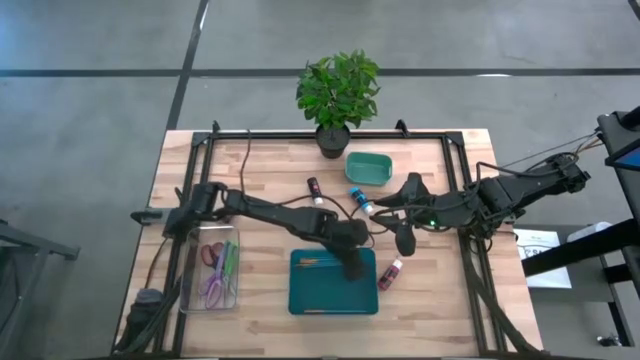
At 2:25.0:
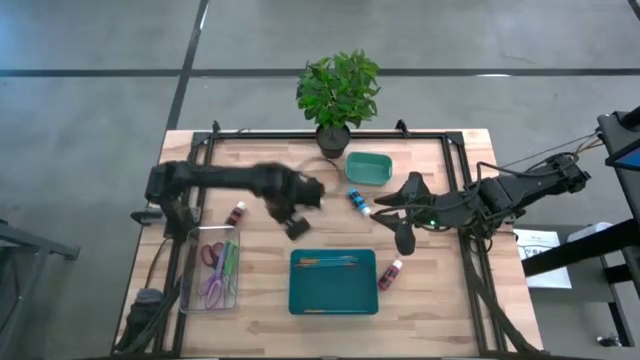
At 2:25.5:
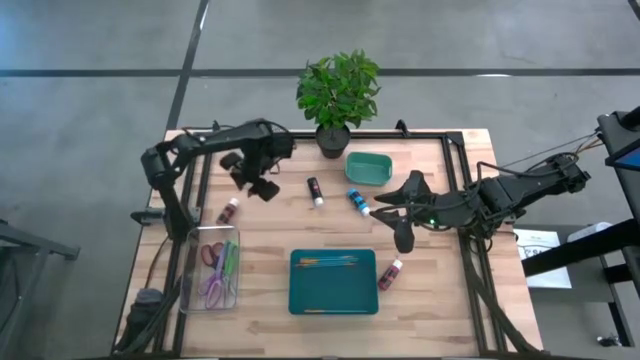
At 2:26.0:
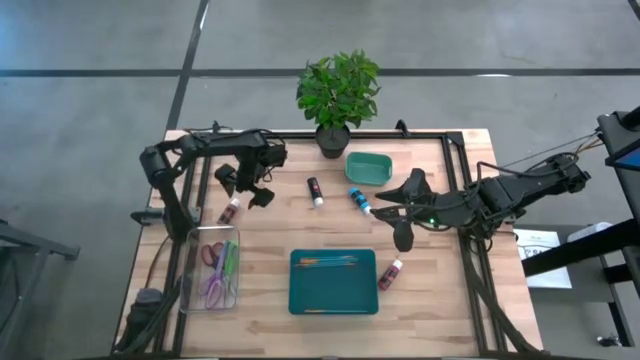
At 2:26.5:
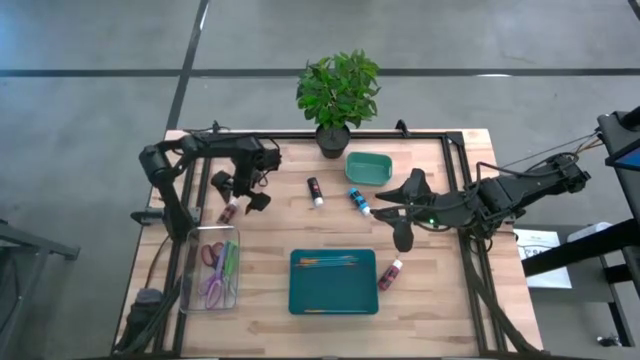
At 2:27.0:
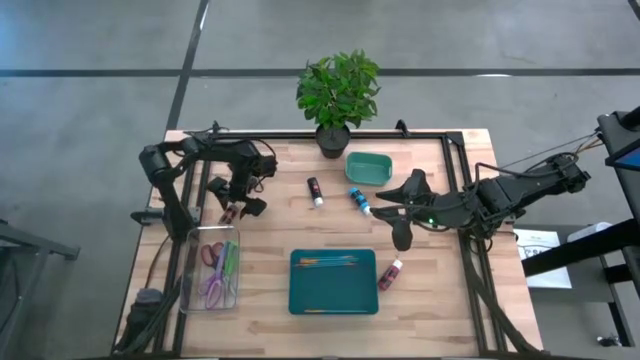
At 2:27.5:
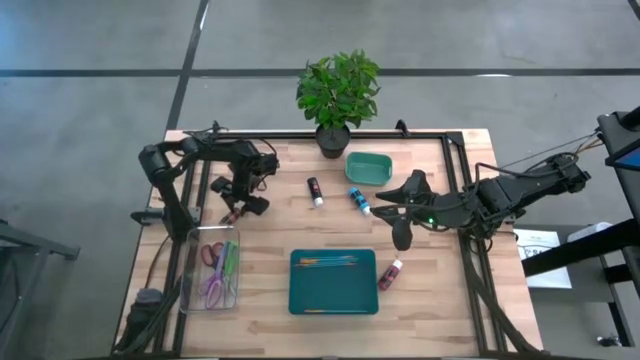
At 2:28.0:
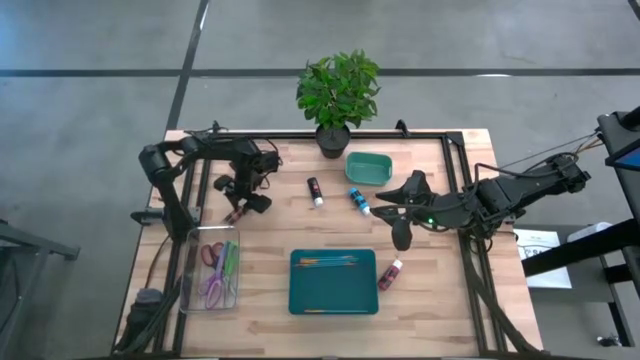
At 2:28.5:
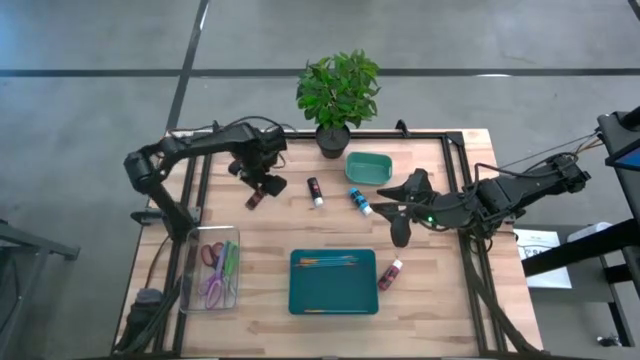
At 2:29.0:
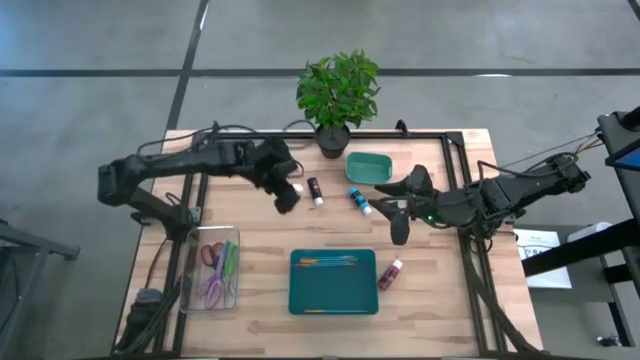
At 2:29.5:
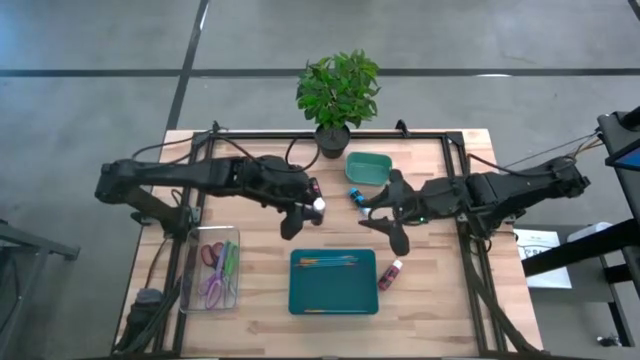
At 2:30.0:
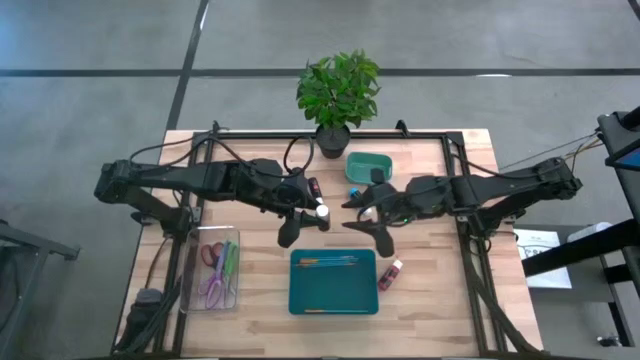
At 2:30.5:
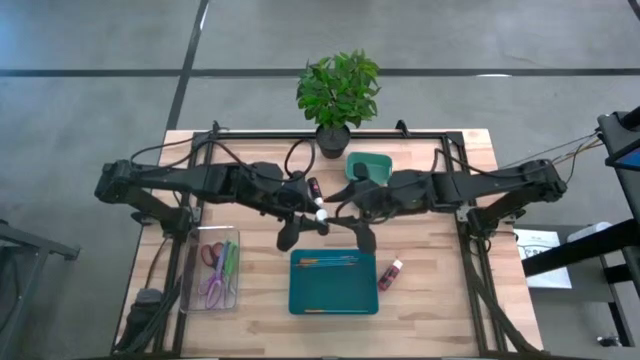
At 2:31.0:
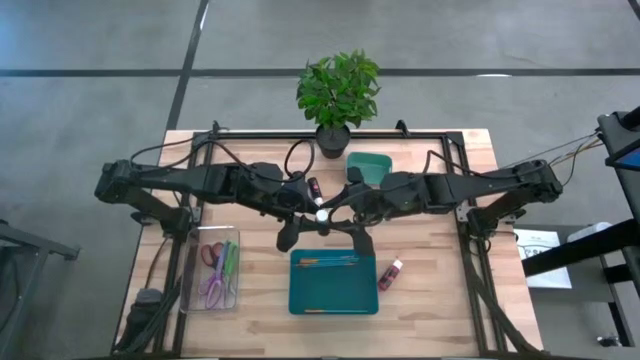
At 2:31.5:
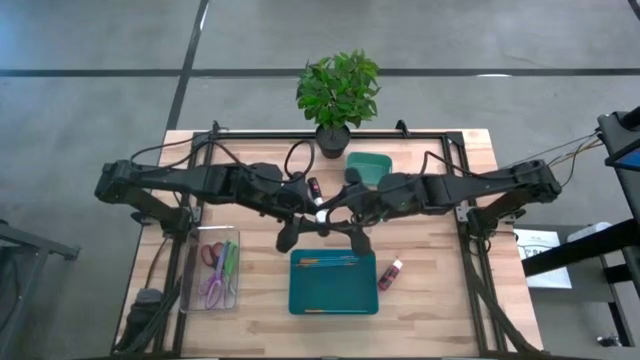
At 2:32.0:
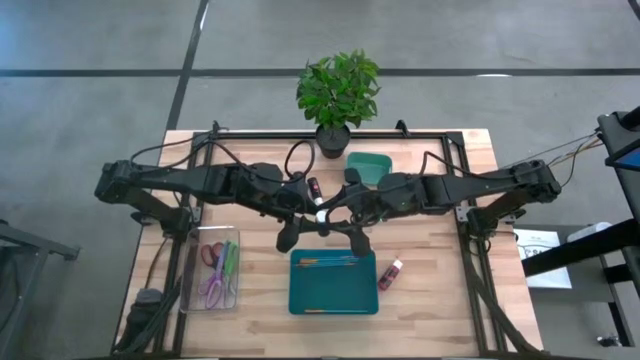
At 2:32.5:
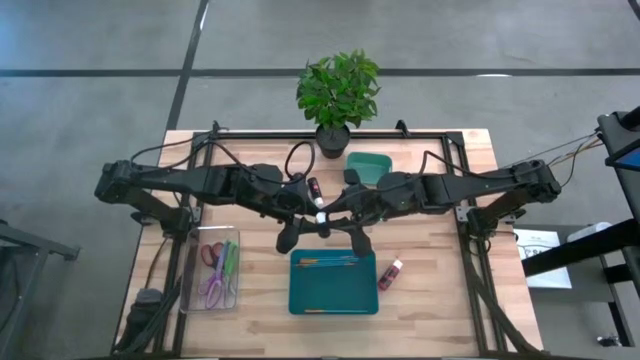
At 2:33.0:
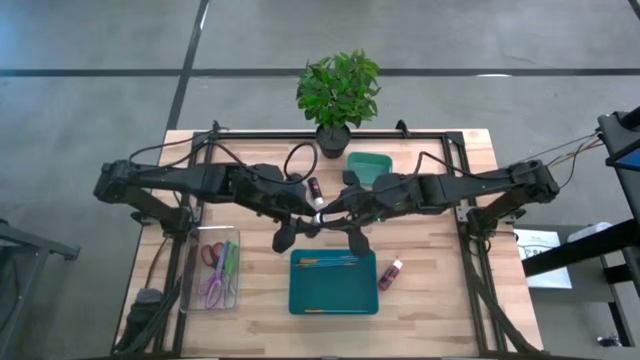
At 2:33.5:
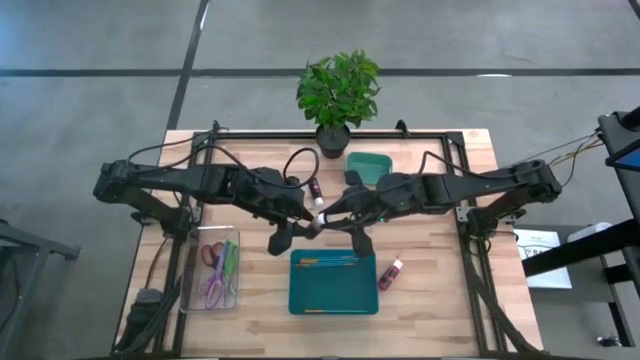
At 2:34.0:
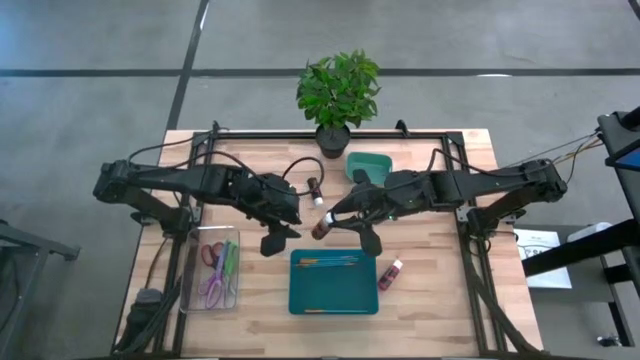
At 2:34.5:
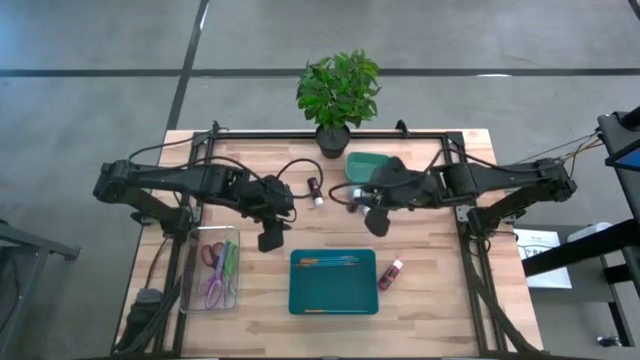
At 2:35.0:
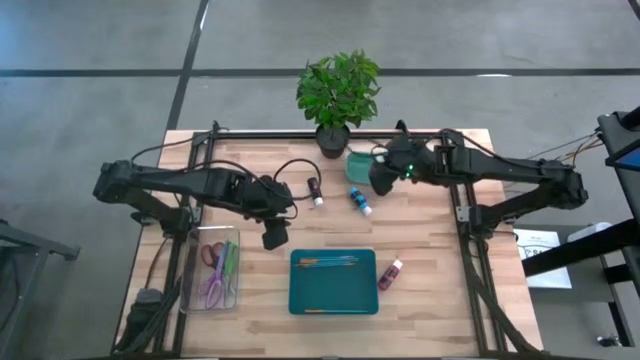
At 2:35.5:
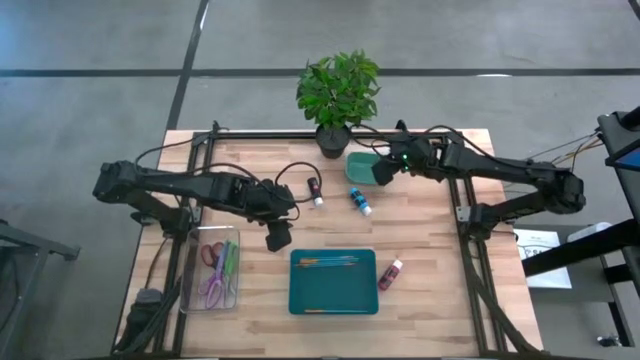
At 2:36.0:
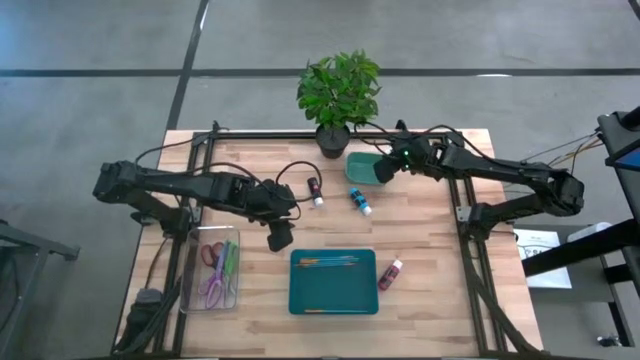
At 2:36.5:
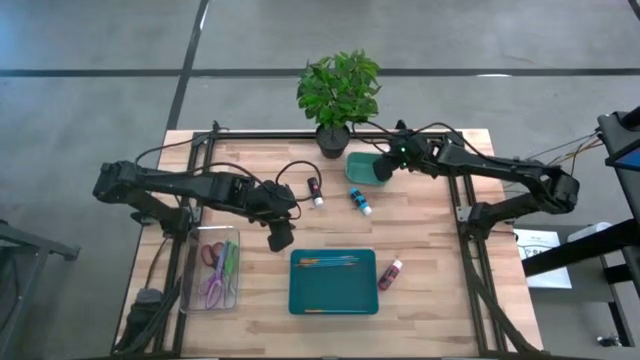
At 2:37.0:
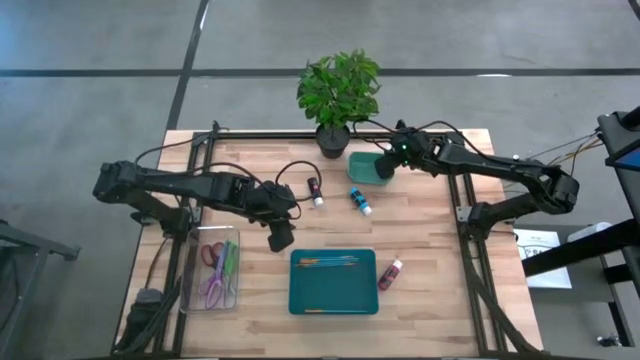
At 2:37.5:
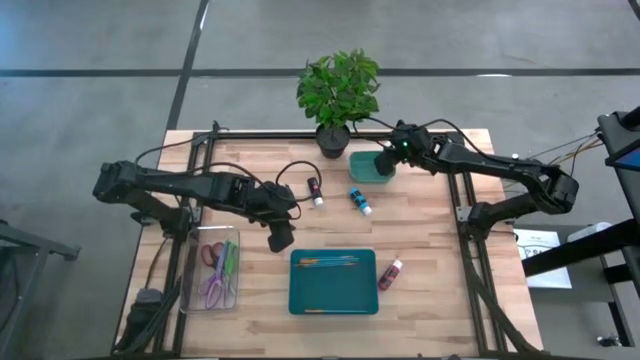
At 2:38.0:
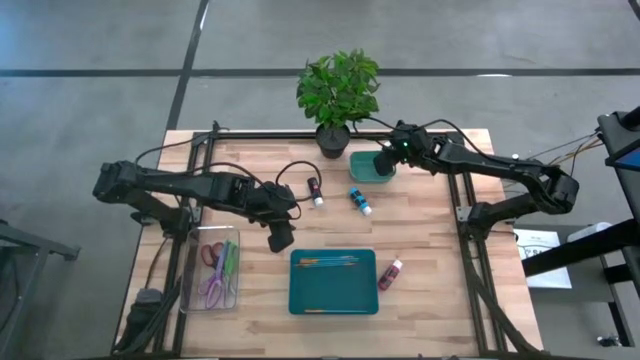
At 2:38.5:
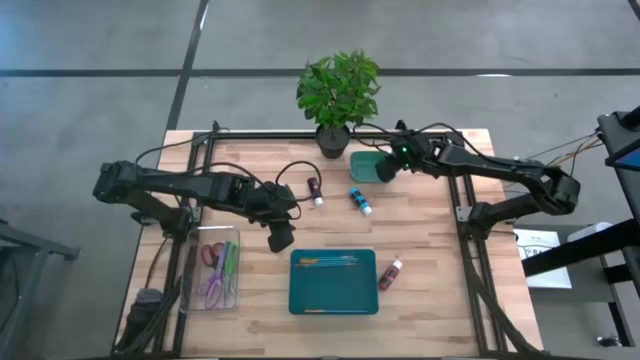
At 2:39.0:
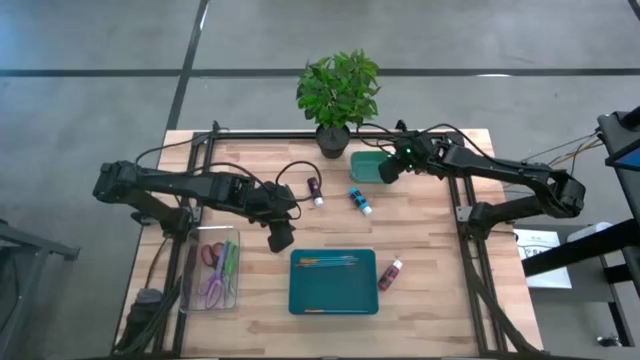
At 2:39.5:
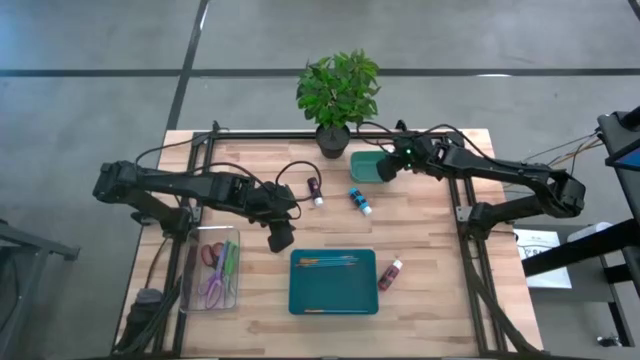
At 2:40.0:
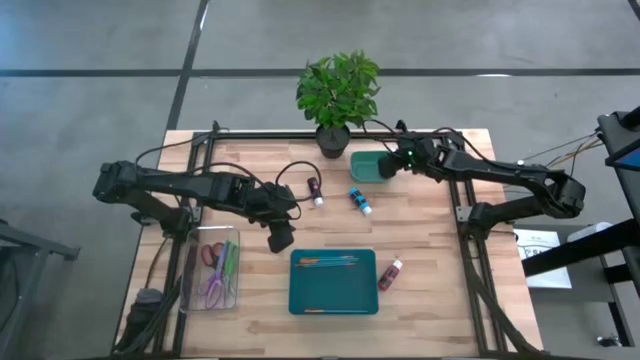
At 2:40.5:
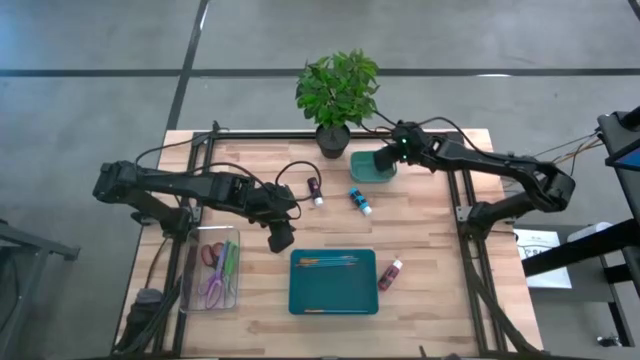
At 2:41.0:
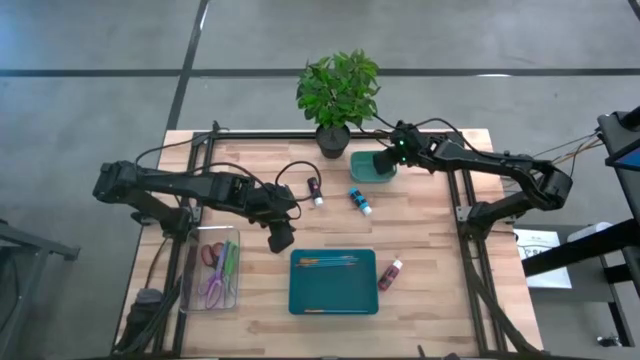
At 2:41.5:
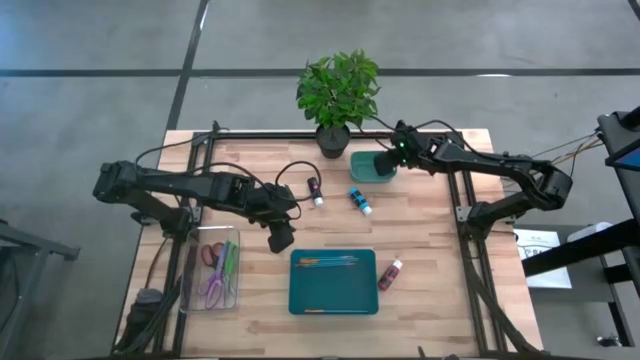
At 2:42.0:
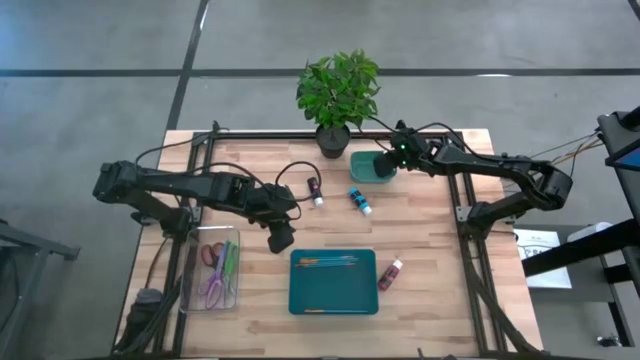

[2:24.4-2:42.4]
Task: Pick & Place Paint Supplies
Put the brown paint bottle into the green bin

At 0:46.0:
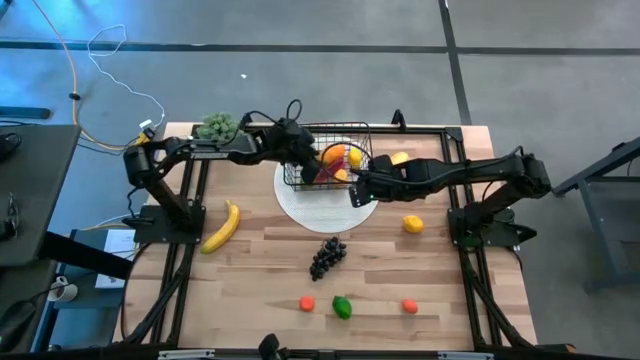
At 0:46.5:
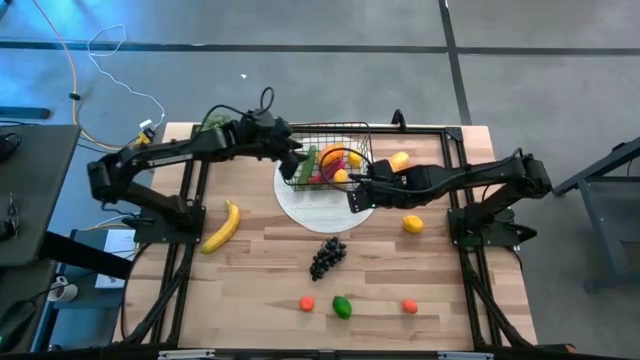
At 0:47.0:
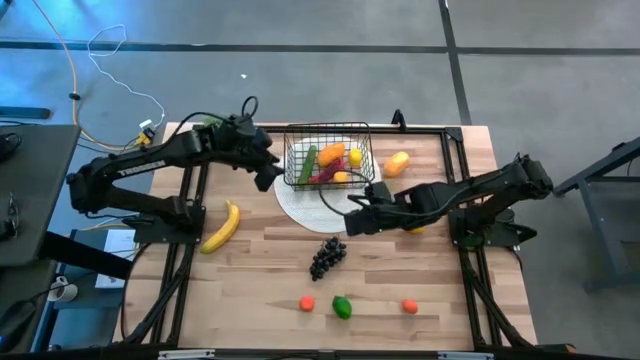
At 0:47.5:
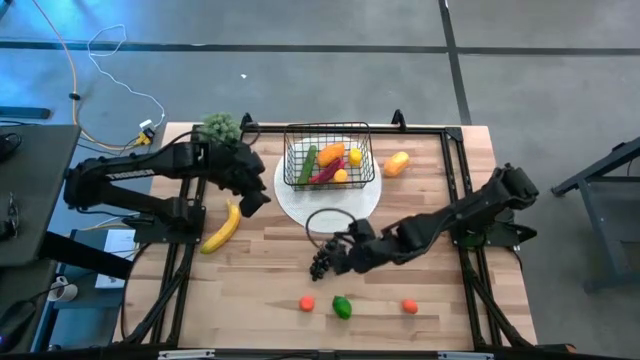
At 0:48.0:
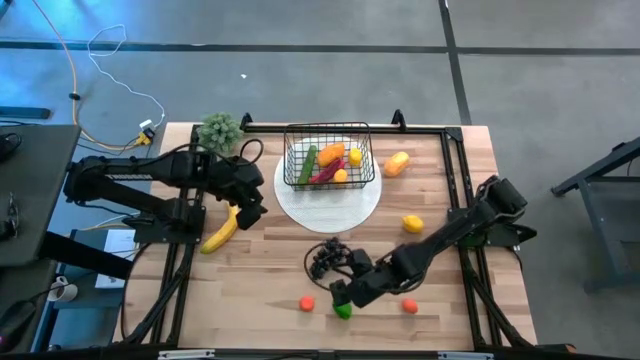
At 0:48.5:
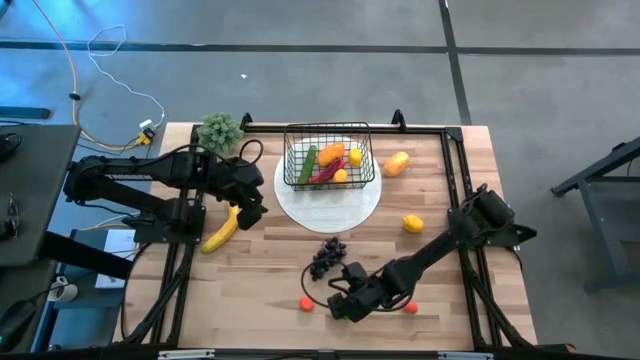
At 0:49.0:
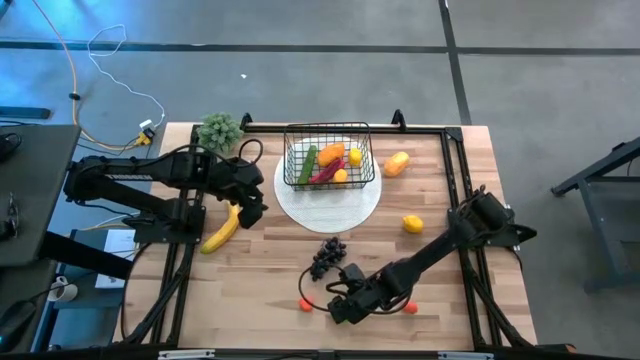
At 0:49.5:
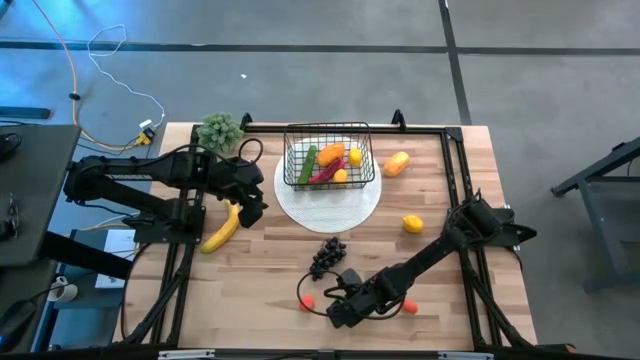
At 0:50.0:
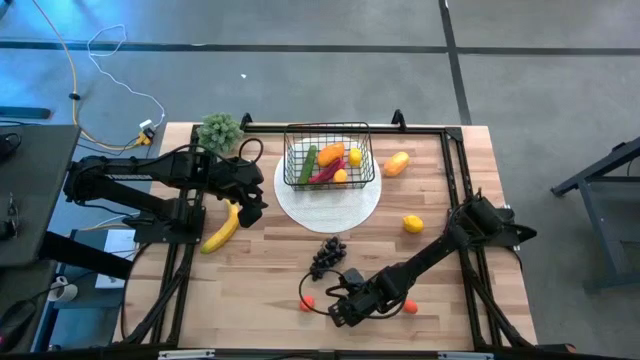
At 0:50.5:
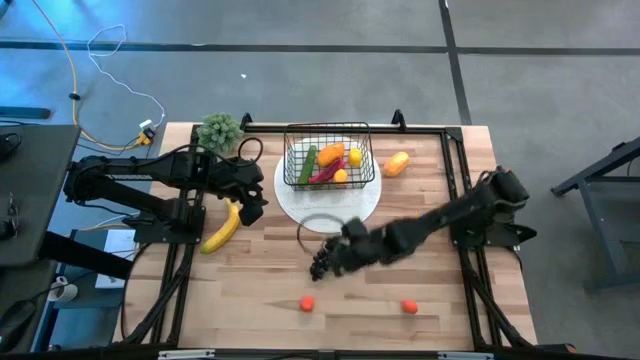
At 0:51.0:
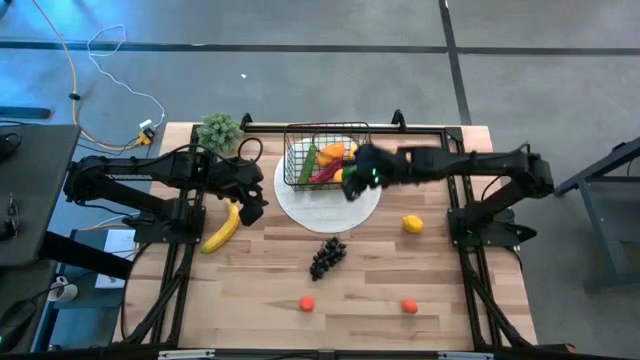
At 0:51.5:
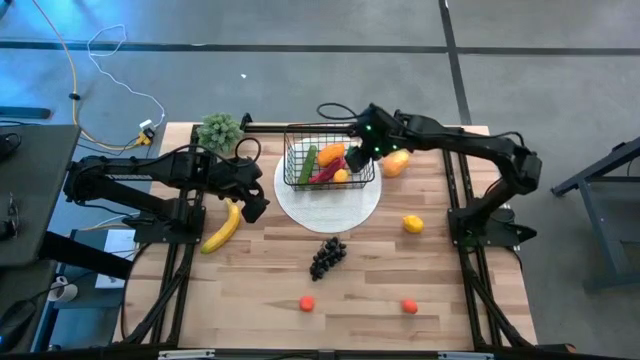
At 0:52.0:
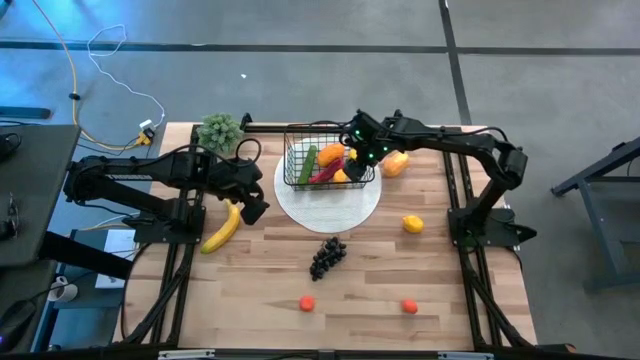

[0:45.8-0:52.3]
Task: Build produce basket
Put the green lime into the black wire basket
